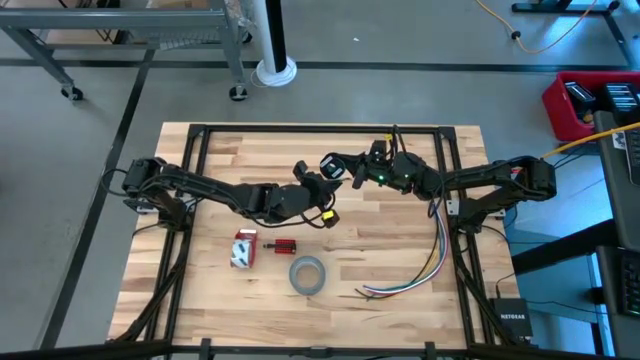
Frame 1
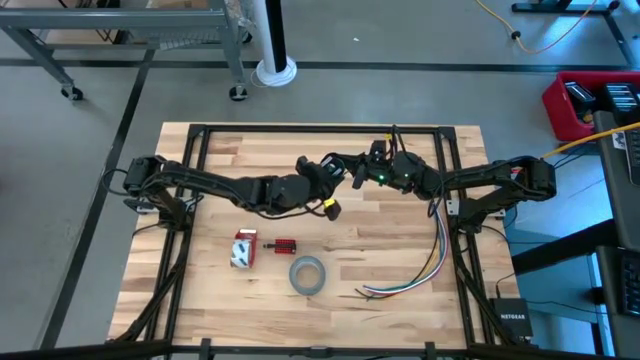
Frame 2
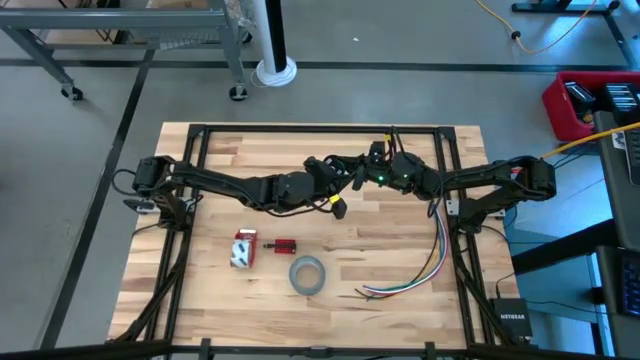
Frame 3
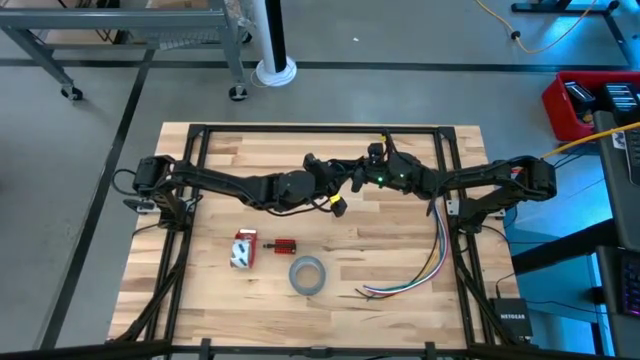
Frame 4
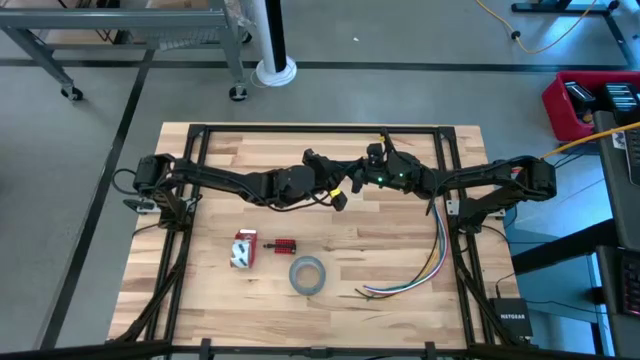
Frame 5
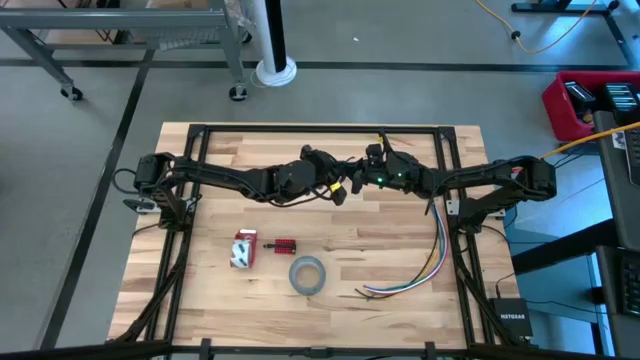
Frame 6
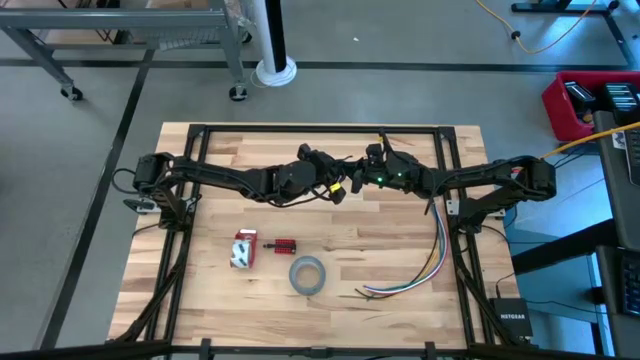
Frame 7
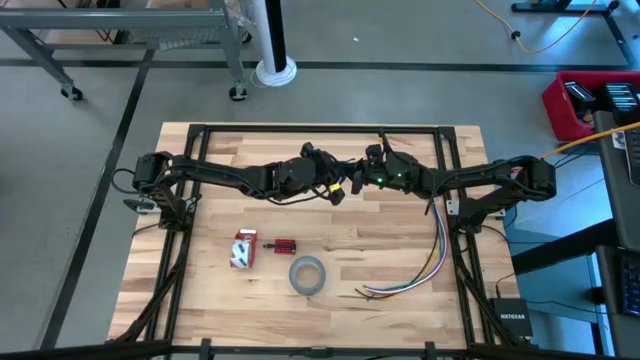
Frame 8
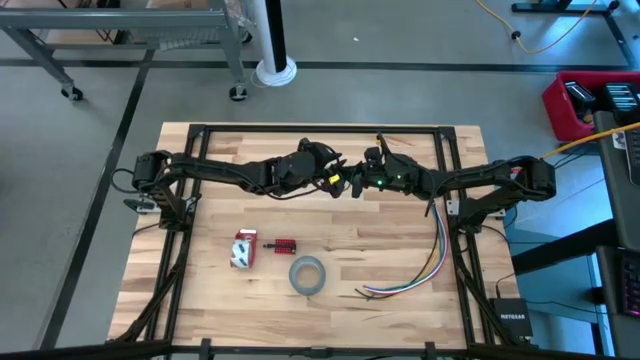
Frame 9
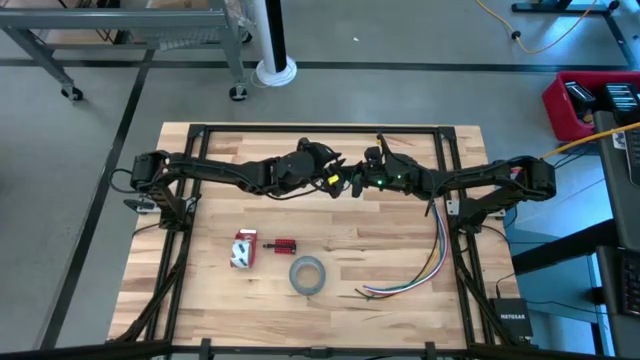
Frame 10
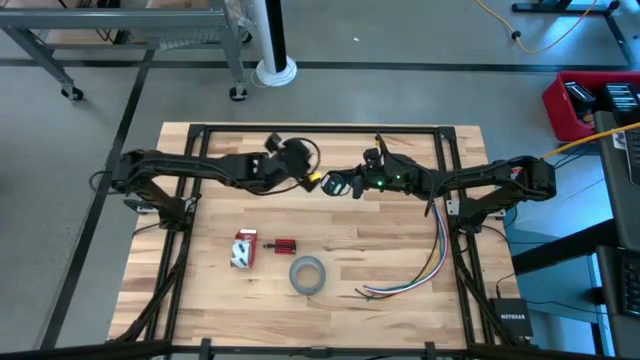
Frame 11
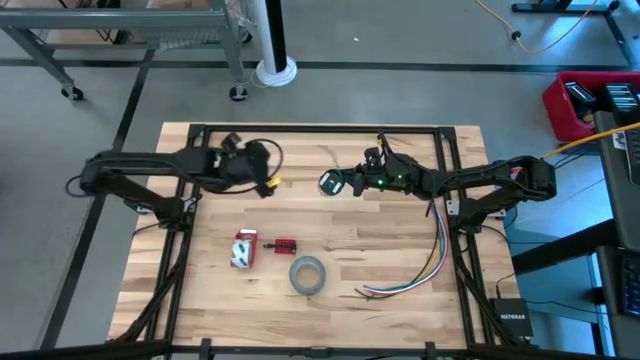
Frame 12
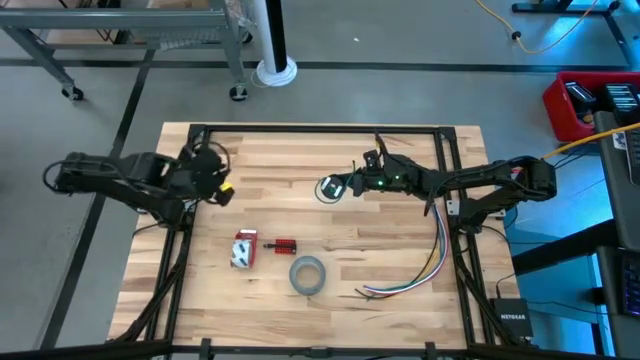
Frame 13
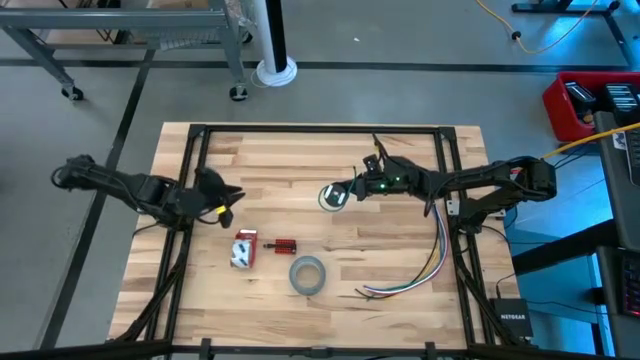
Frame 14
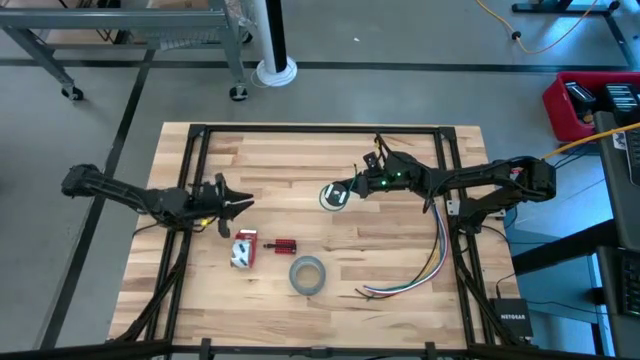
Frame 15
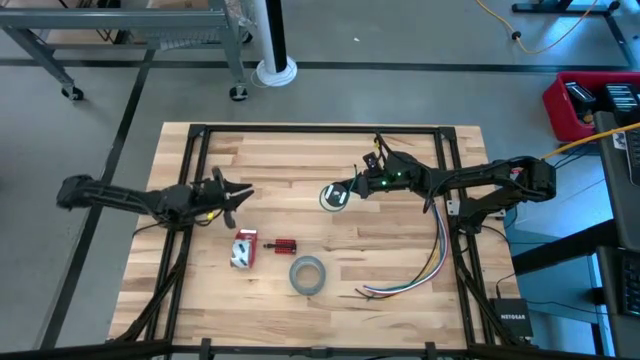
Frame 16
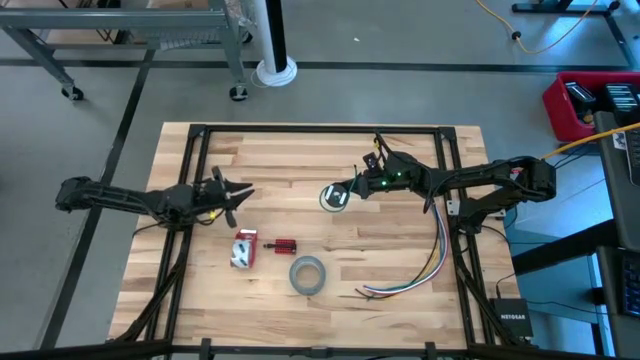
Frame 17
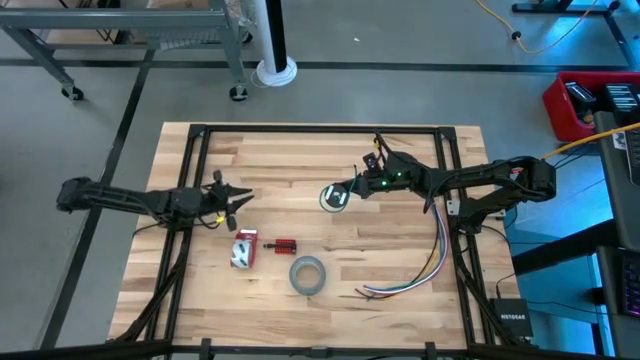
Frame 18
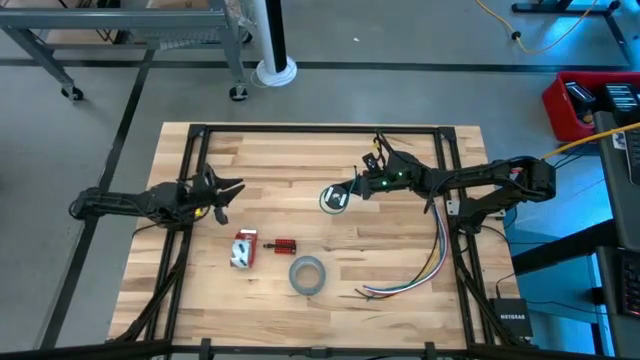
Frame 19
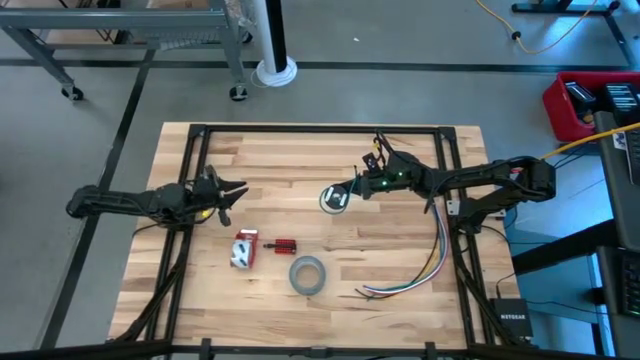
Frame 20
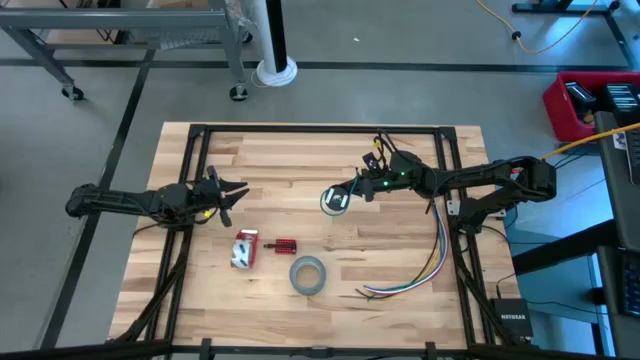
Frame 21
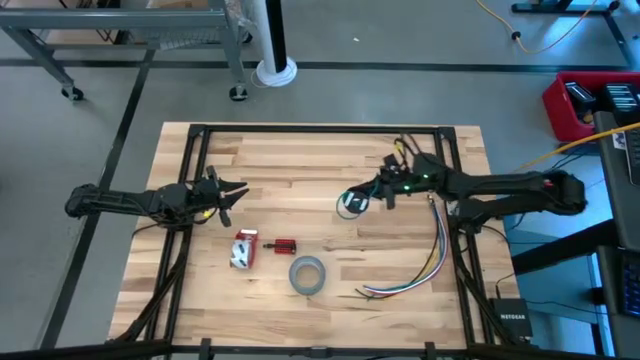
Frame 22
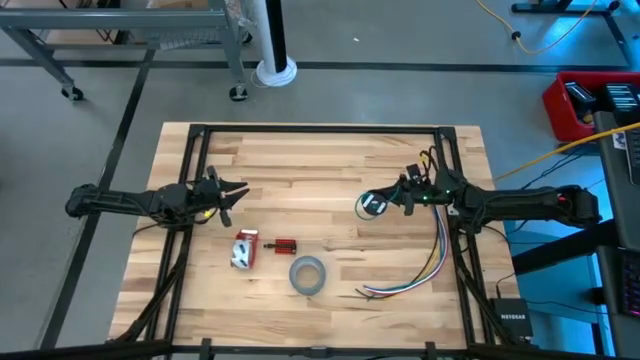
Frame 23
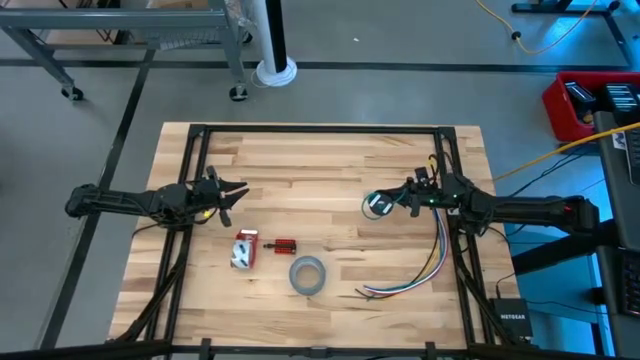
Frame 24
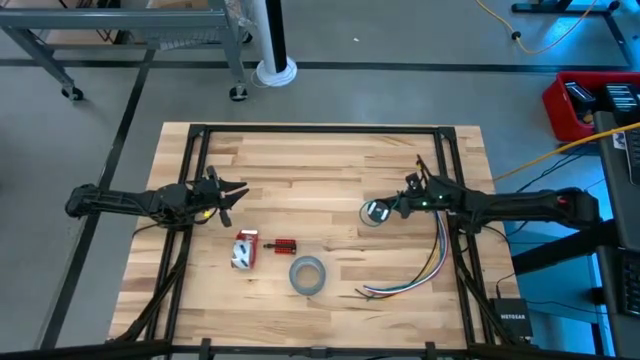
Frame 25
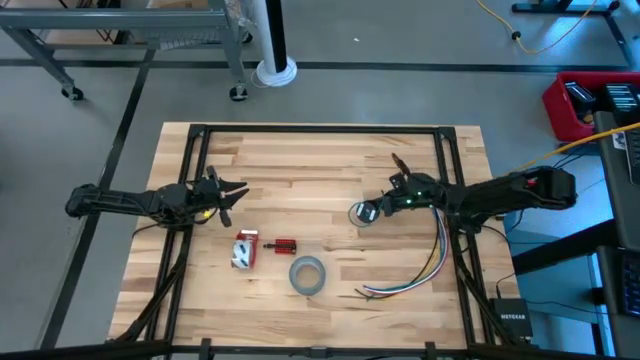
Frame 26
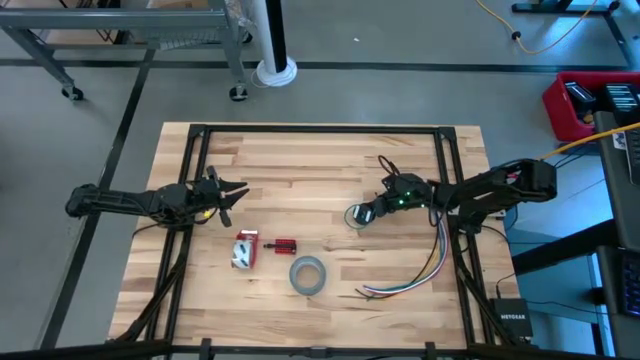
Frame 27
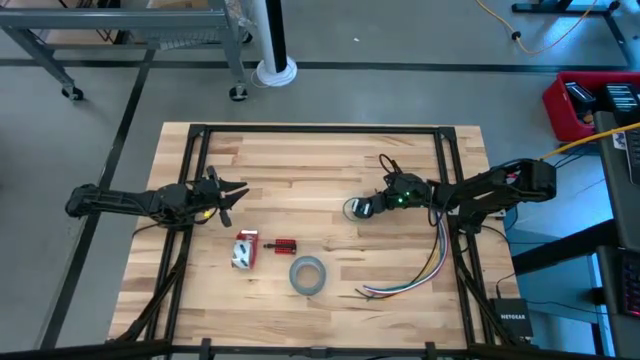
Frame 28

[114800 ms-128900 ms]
Task: Coil cords
Coil the green wire onto the spool

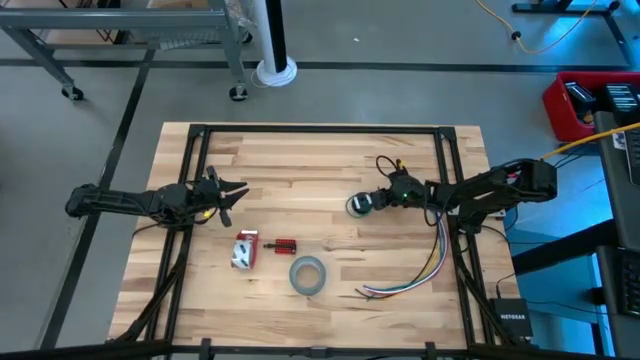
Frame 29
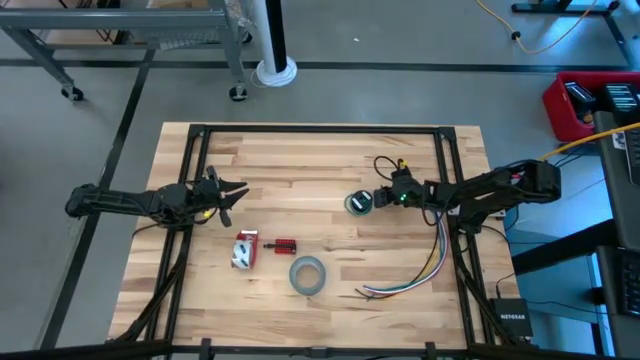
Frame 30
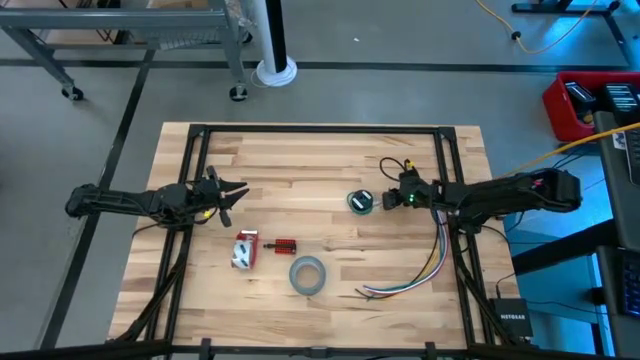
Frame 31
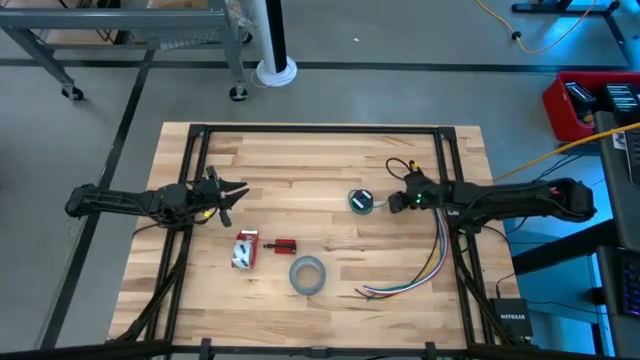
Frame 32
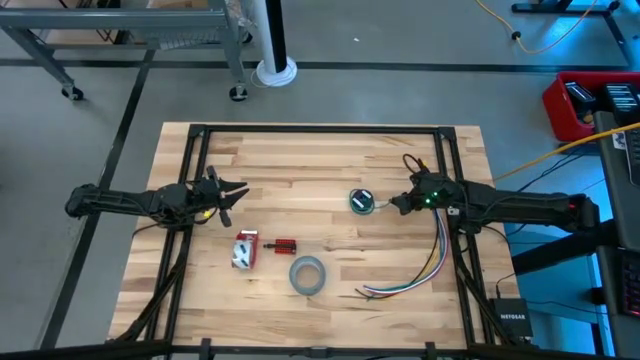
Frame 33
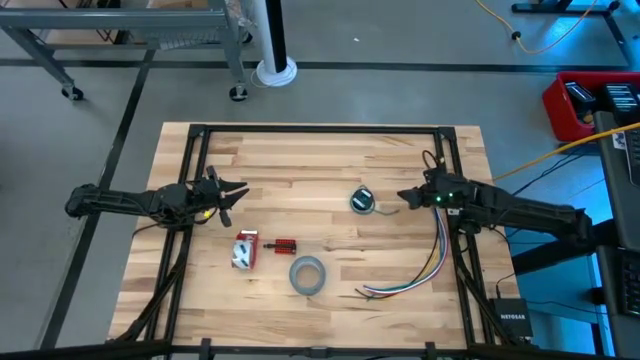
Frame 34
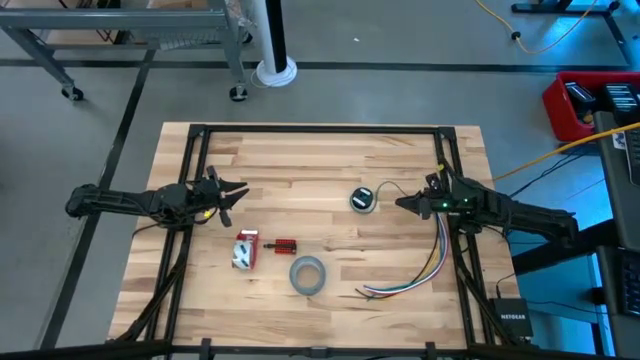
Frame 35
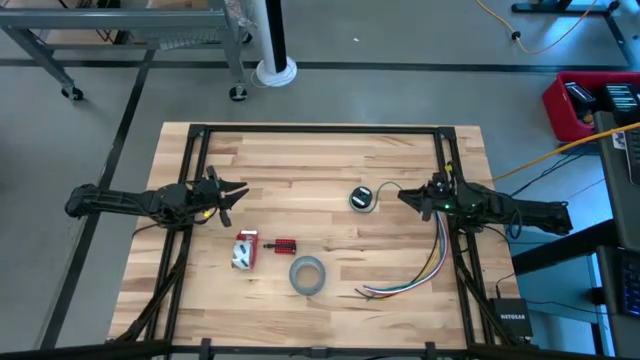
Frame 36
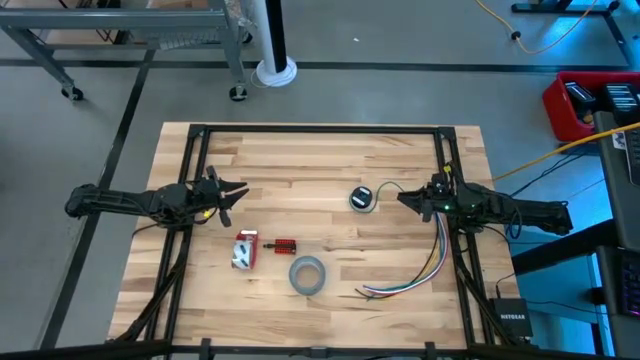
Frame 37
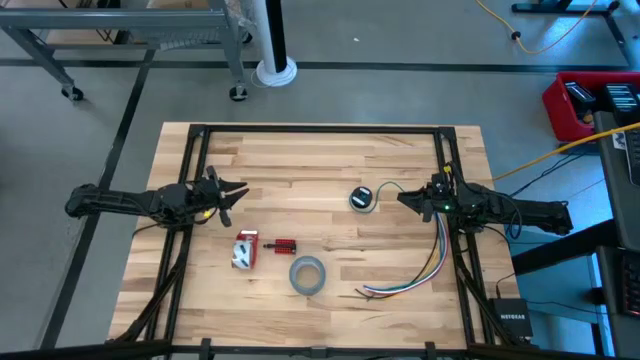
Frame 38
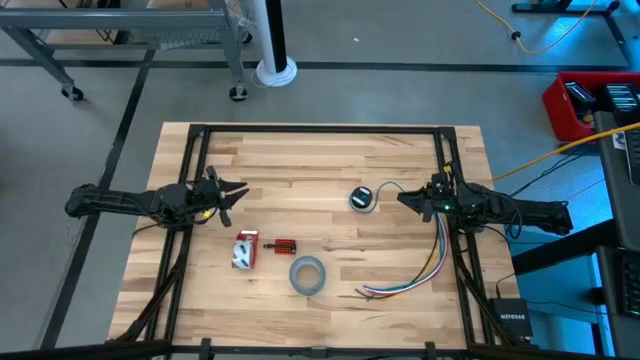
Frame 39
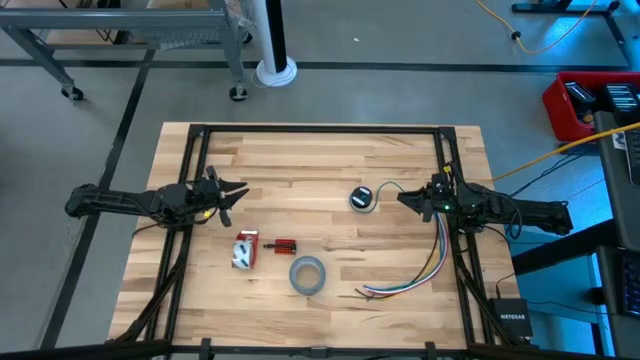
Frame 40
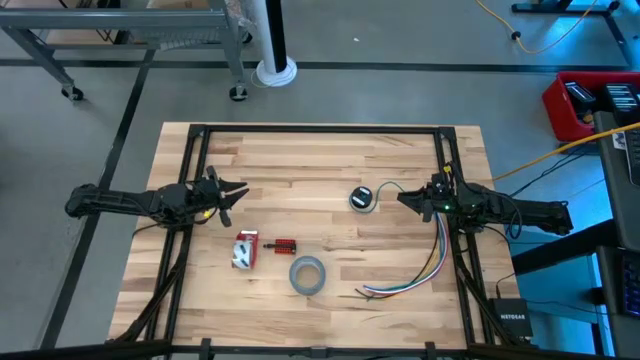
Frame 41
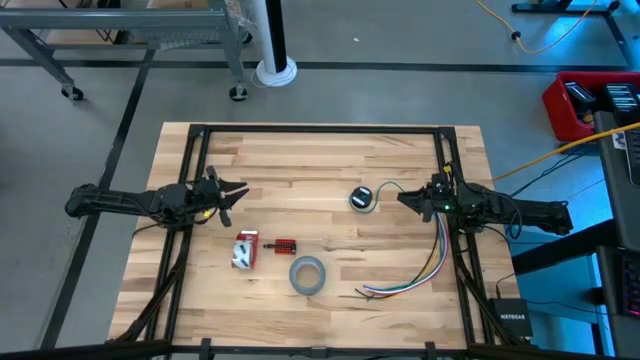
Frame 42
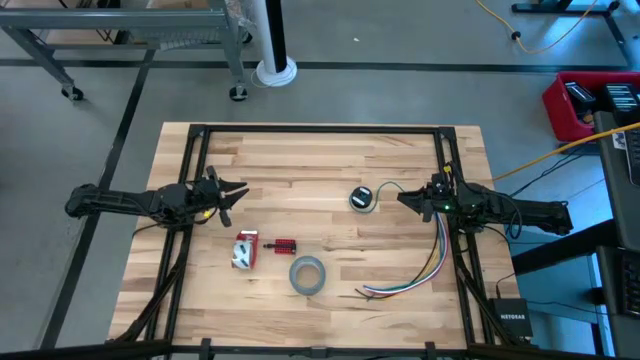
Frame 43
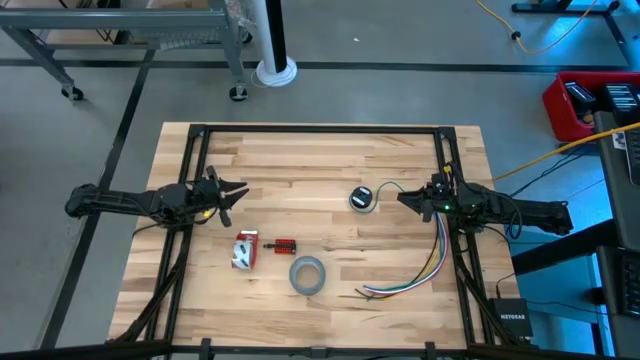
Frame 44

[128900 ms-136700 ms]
Return to Home Position
